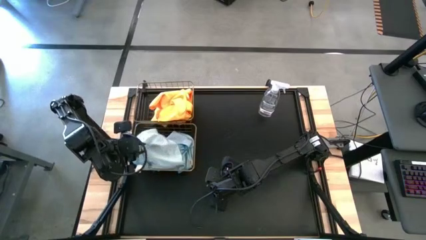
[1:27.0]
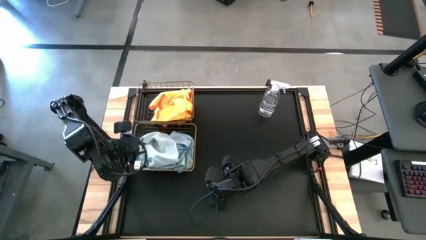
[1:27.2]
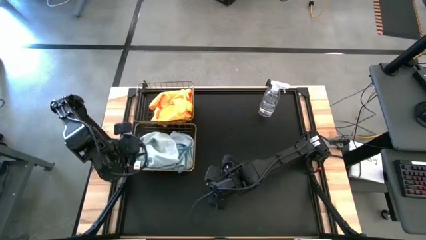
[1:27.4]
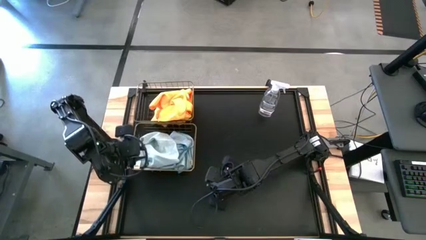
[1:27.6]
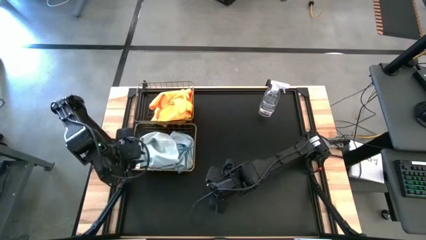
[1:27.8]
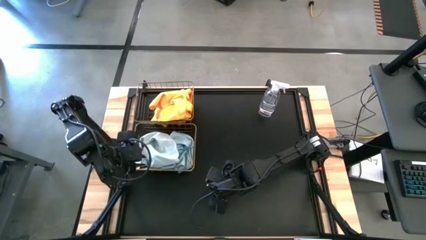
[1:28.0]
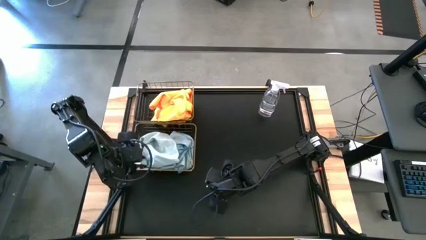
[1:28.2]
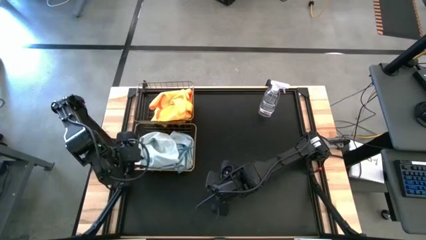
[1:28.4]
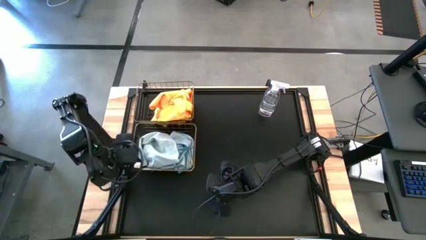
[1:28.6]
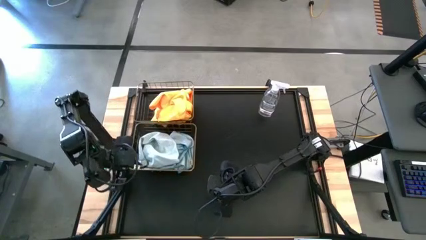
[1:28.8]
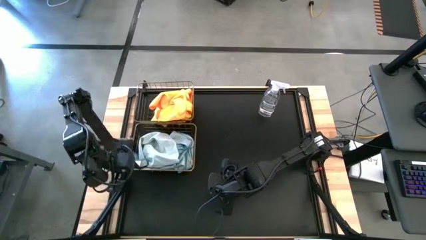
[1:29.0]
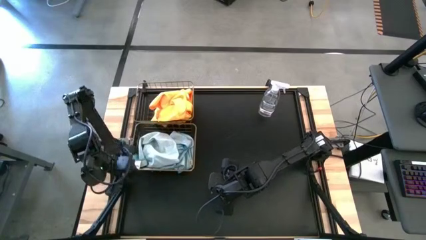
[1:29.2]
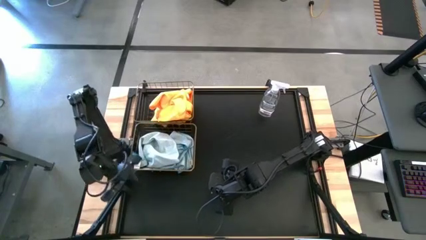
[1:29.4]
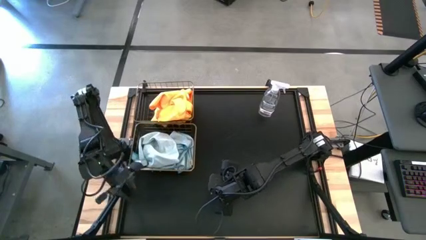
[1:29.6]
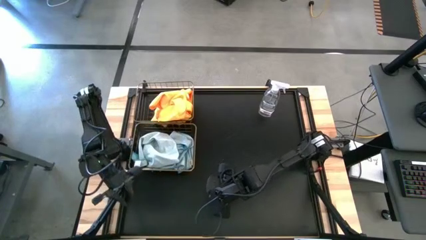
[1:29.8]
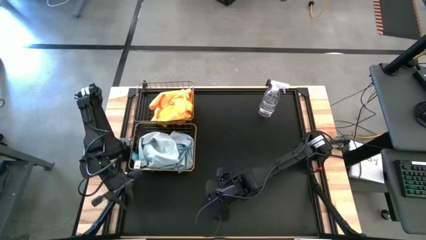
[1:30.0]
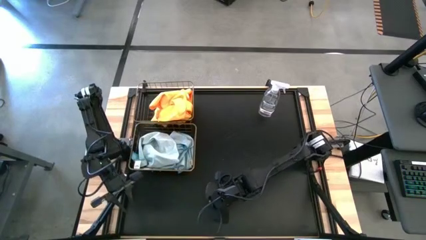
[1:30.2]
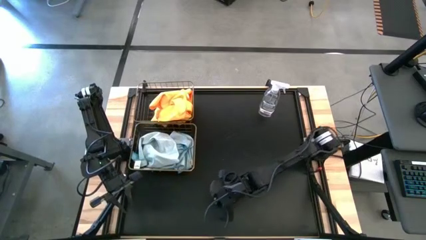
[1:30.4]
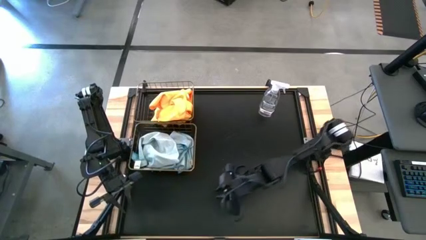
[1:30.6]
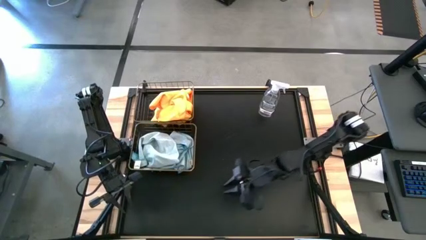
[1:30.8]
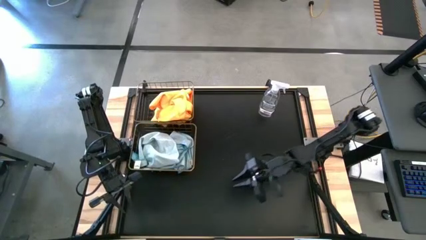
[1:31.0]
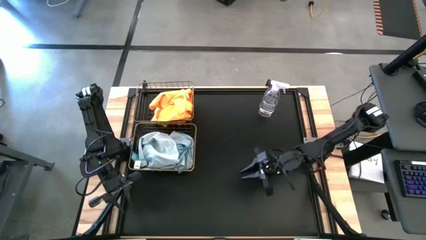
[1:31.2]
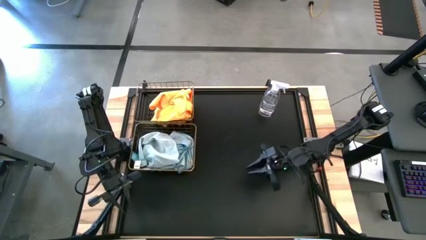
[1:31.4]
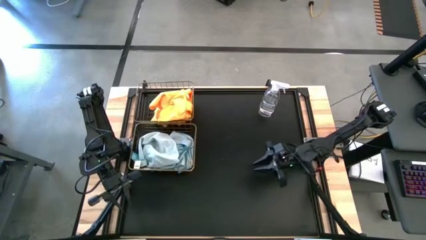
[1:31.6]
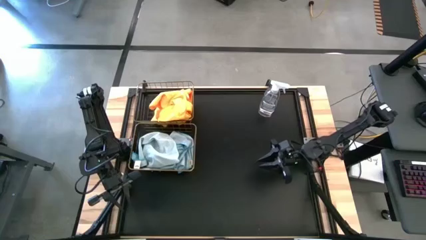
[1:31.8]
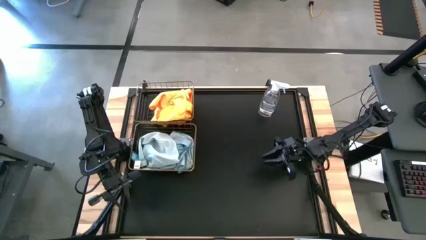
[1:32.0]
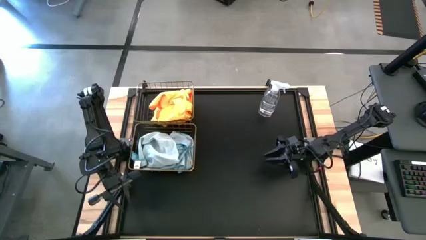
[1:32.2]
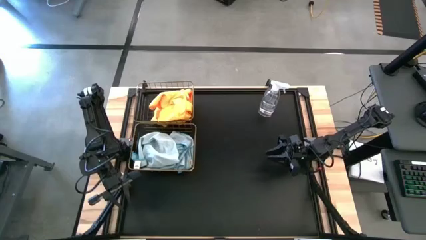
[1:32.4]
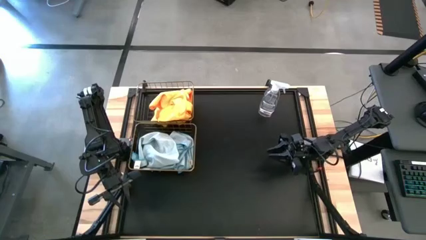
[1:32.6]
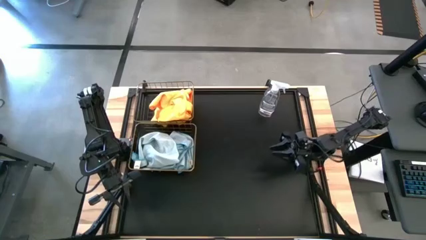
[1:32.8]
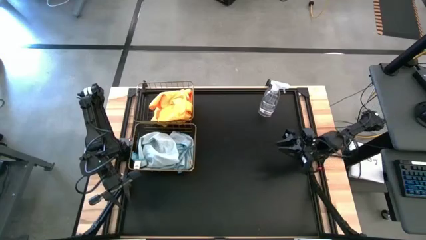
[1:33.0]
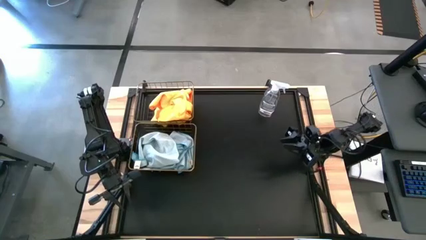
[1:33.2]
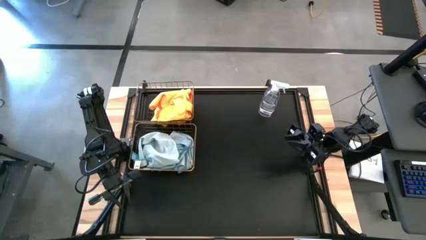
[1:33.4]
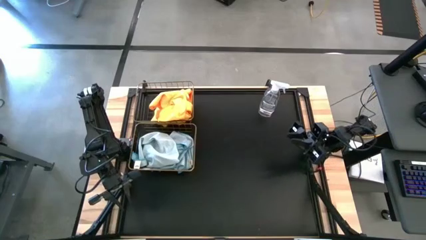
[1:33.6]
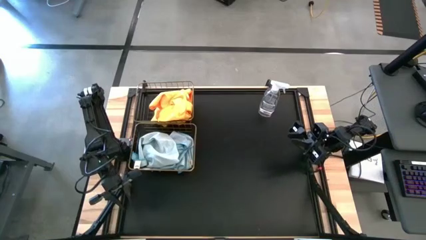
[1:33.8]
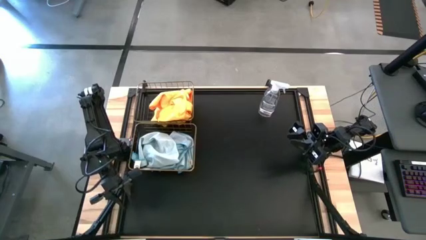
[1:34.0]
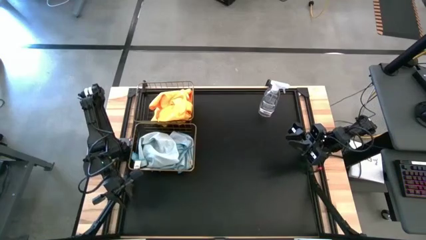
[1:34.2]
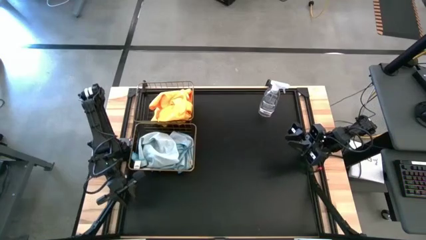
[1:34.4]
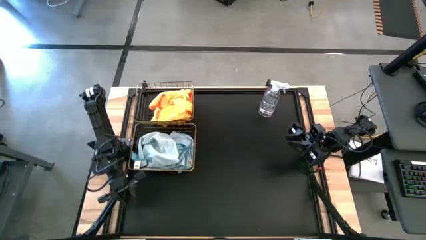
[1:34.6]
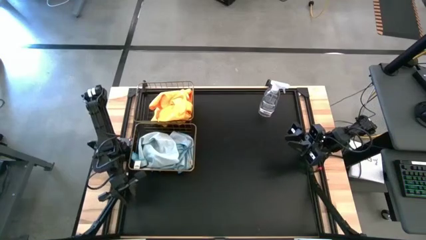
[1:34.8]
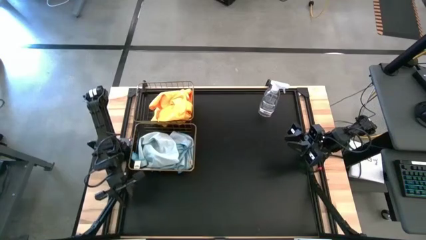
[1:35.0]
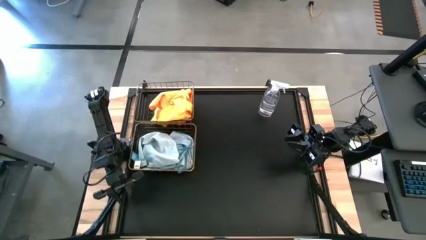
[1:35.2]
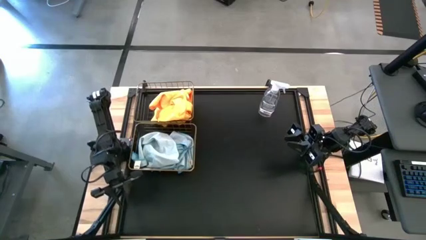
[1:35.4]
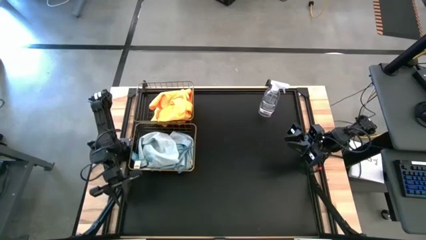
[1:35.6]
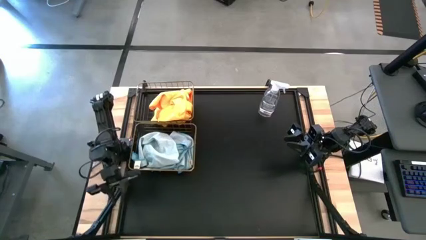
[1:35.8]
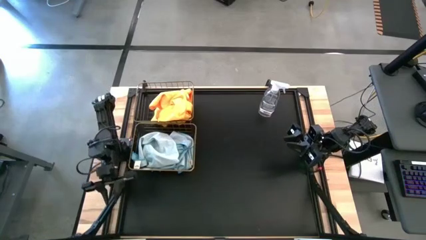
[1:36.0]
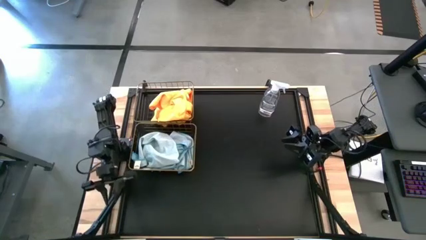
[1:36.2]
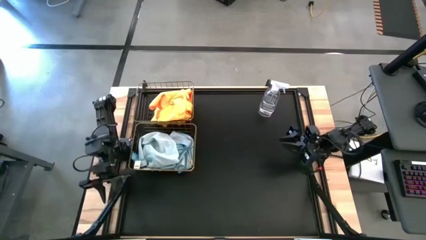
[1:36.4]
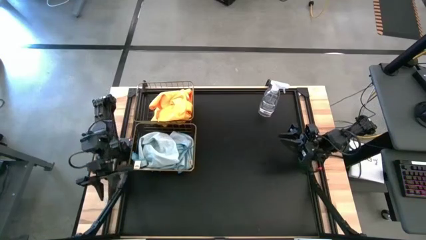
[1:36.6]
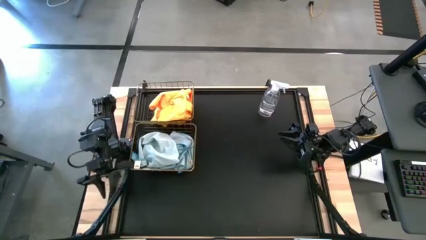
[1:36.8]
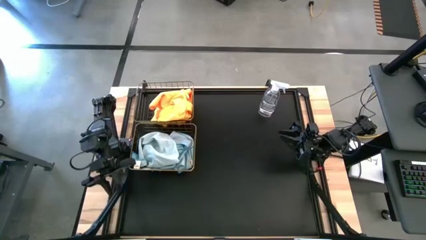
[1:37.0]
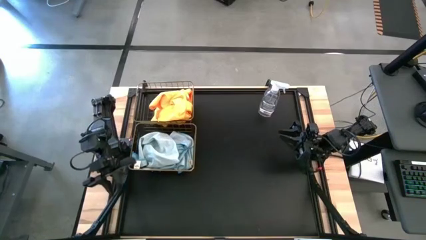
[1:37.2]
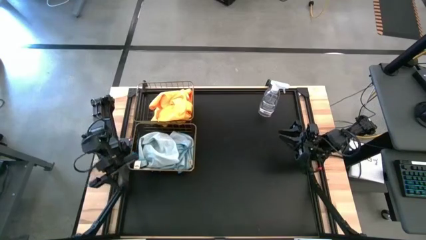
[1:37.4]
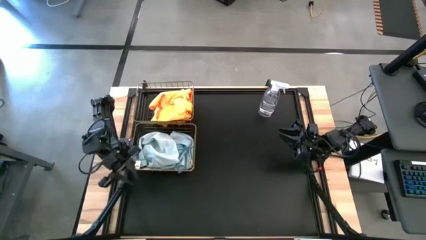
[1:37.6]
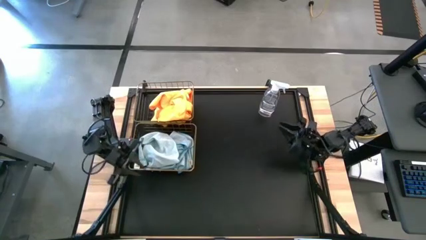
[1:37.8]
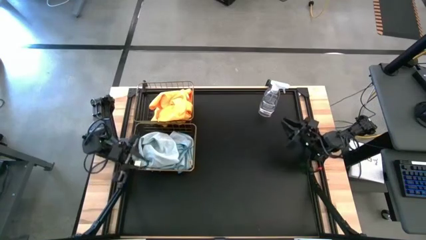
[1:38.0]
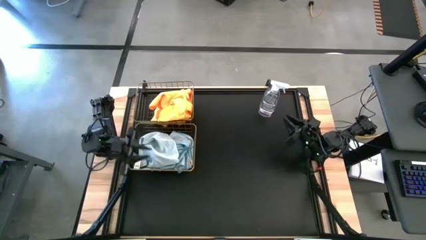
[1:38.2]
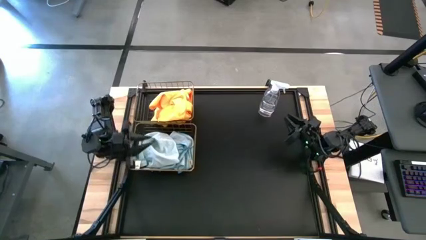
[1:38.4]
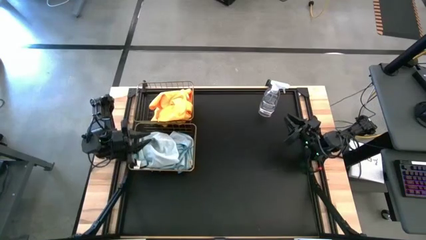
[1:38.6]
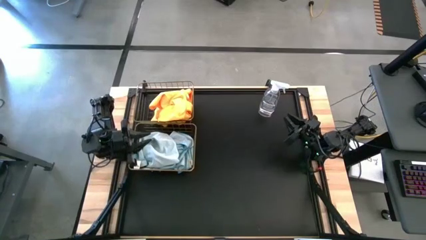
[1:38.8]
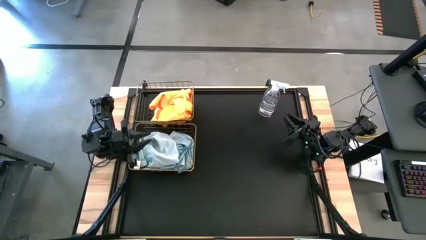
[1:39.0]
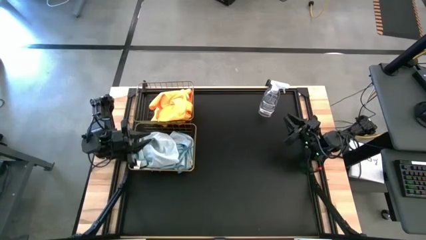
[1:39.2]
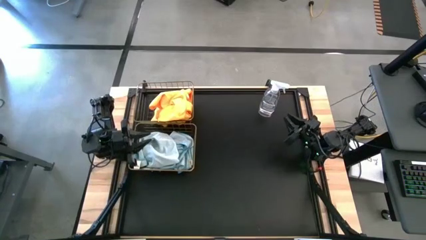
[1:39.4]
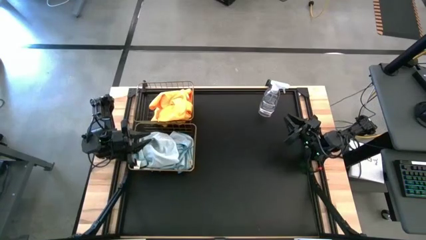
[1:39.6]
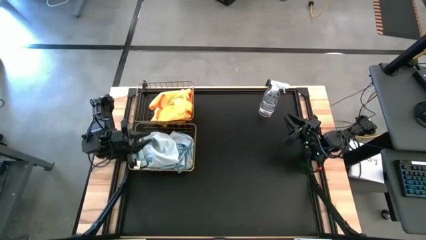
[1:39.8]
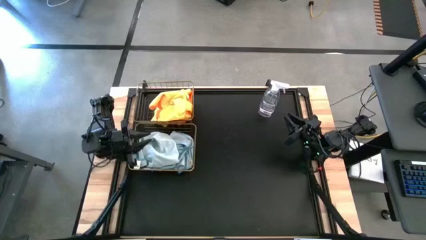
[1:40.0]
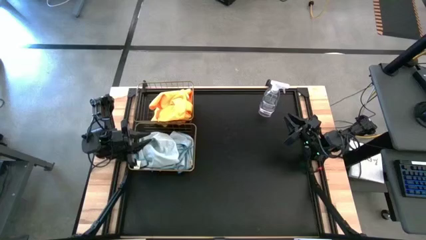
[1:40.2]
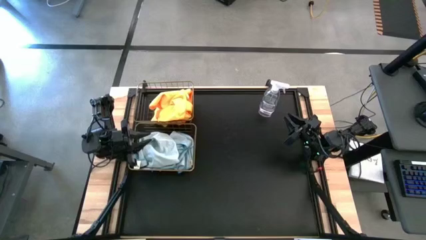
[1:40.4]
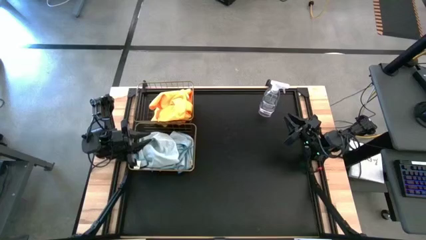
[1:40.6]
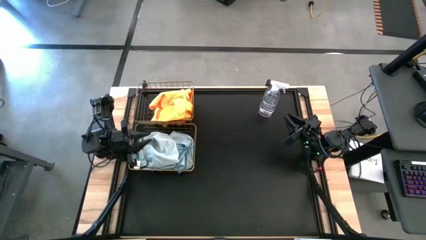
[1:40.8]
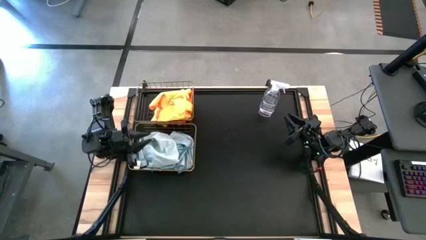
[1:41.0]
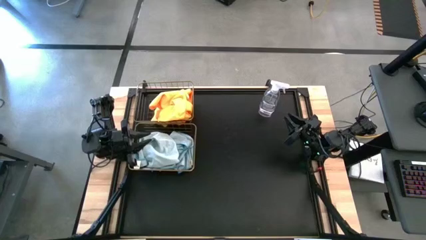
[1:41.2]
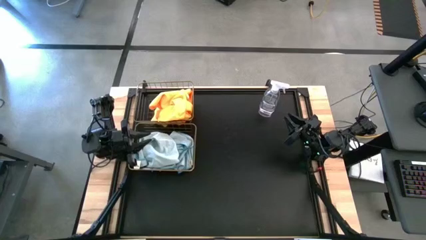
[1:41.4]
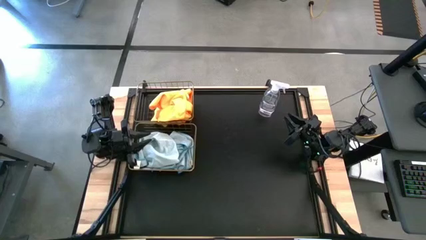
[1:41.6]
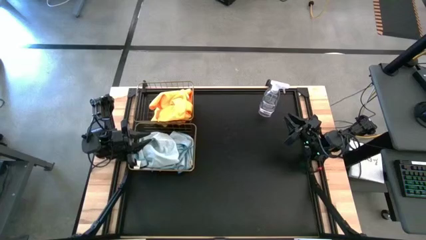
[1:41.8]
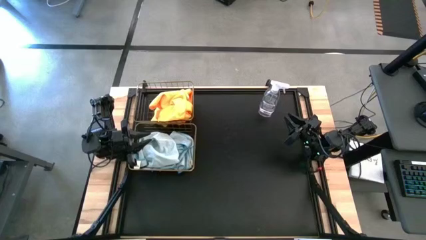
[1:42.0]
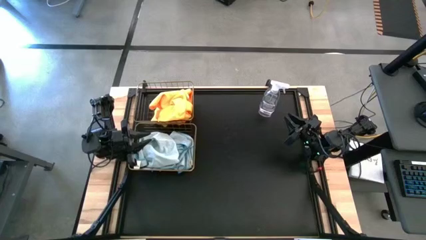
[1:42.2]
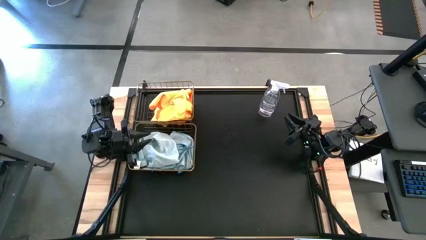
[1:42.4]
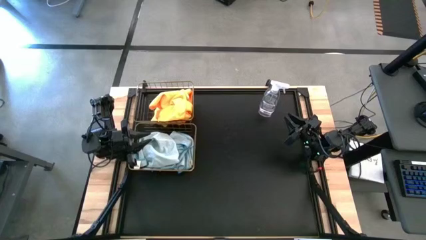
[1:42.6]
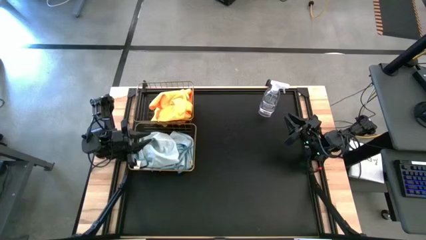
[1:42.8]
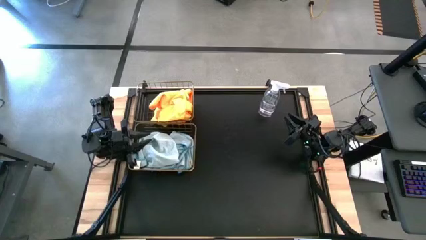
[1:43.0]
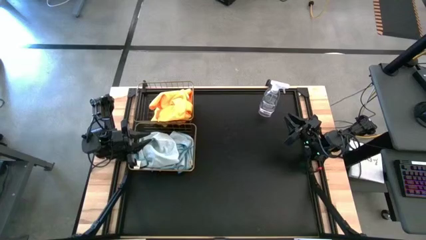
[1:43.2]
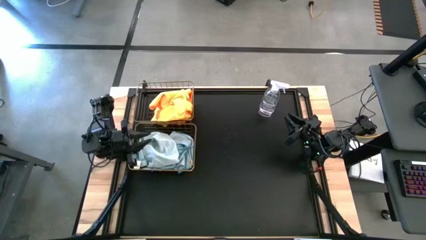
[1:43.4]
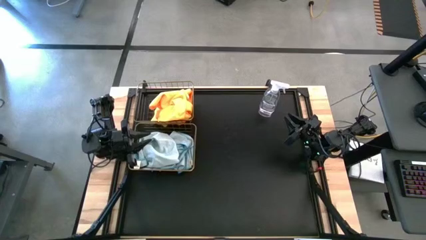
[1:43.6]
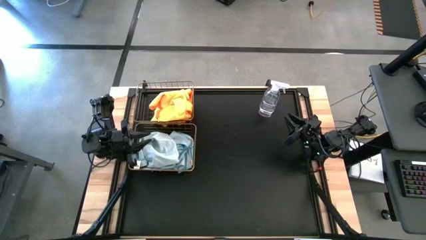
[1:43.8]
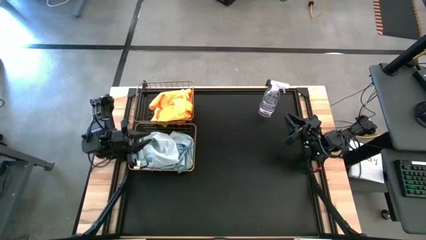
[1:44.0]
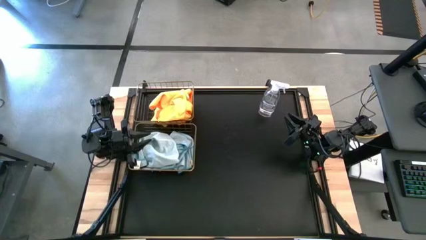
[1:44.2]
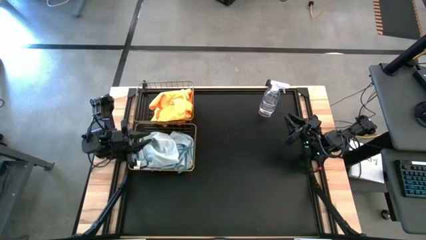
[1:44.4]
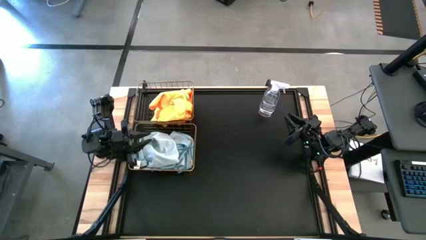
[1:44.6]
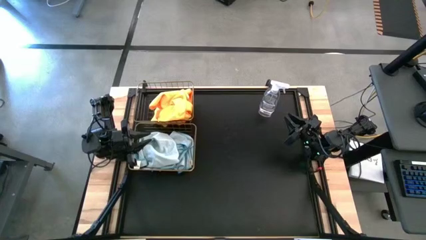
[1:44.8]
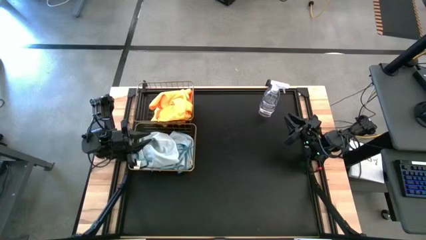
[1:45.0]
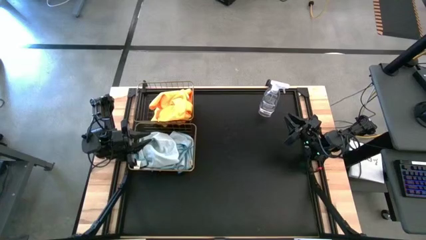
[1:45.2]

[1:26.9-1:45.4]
Task: Sort microfiber towel by color & place in baskets
Return to Home Position
